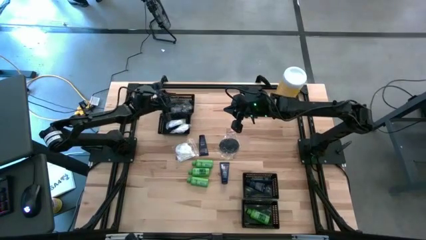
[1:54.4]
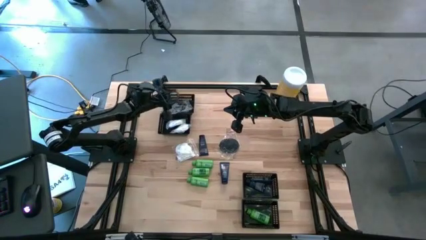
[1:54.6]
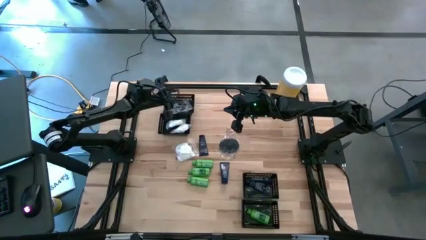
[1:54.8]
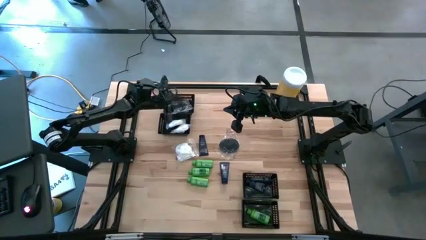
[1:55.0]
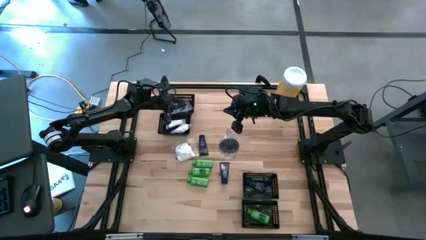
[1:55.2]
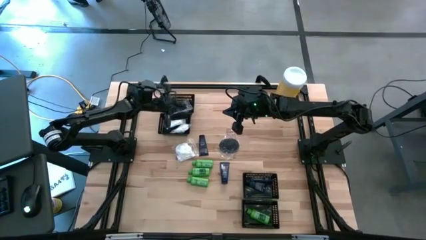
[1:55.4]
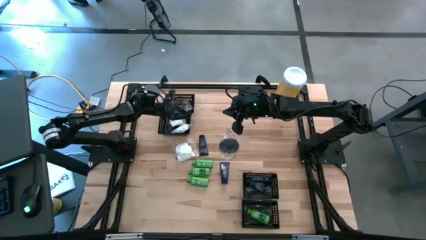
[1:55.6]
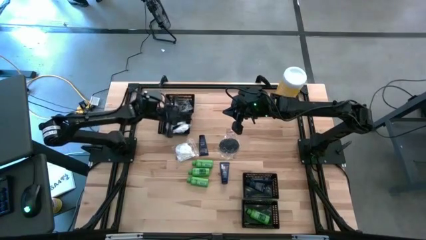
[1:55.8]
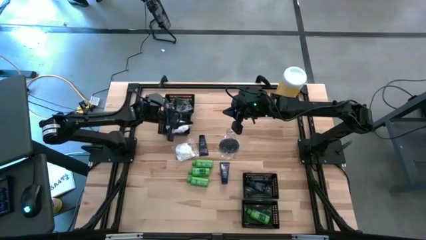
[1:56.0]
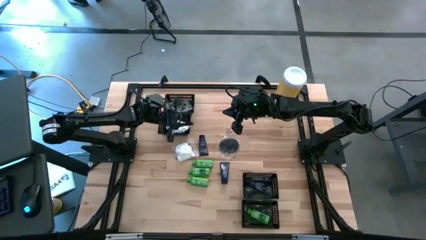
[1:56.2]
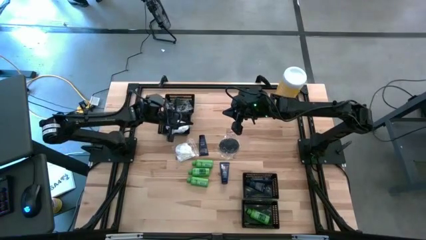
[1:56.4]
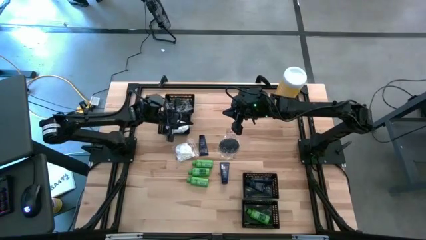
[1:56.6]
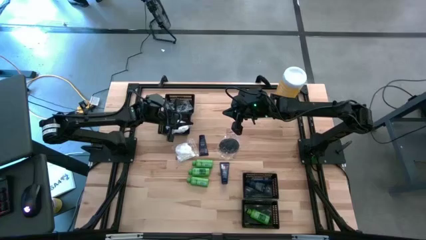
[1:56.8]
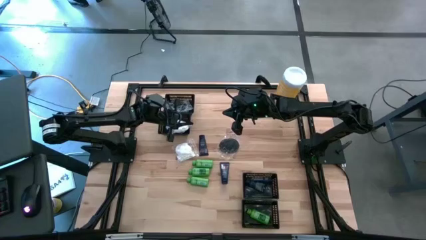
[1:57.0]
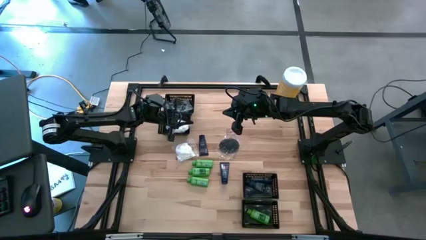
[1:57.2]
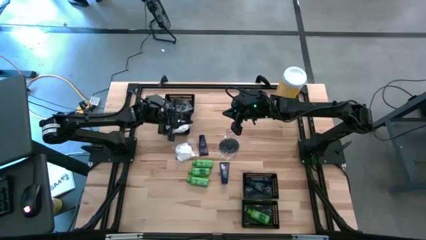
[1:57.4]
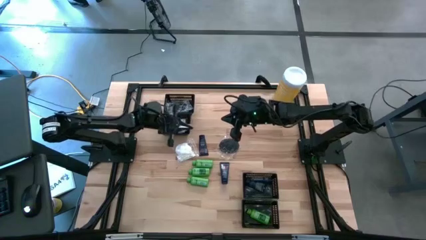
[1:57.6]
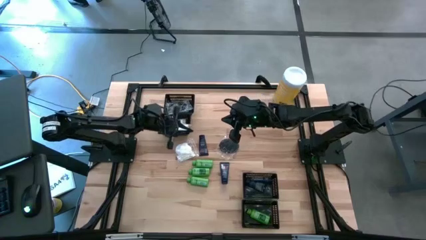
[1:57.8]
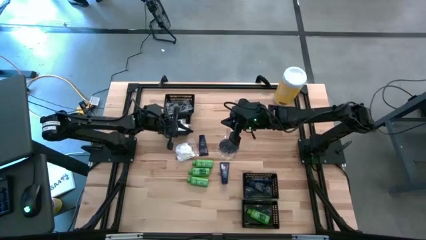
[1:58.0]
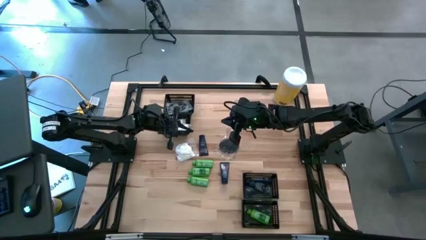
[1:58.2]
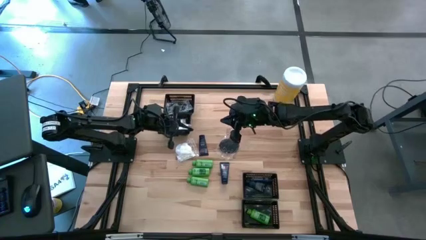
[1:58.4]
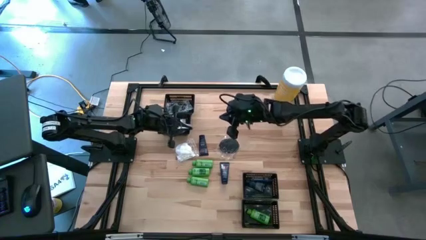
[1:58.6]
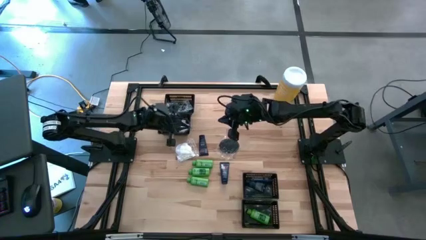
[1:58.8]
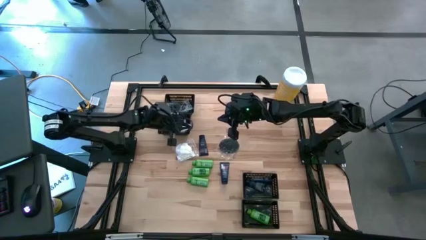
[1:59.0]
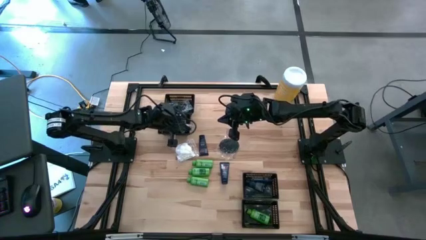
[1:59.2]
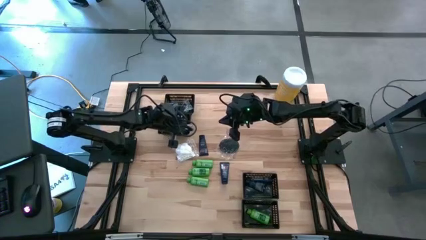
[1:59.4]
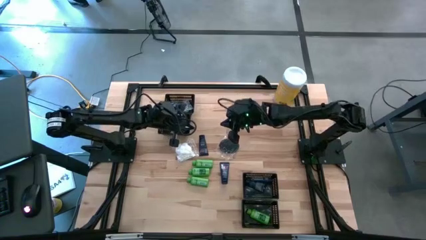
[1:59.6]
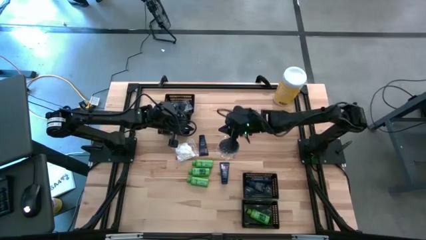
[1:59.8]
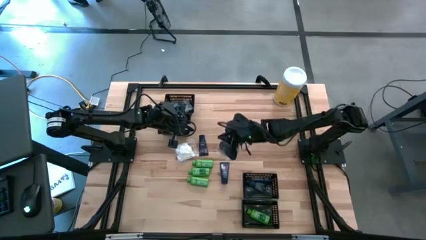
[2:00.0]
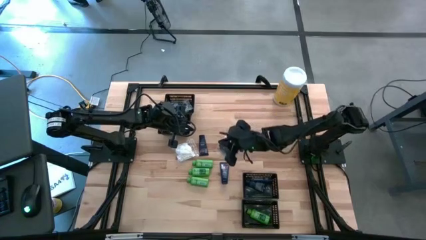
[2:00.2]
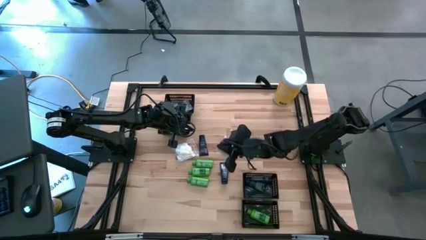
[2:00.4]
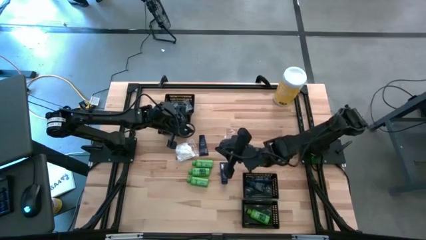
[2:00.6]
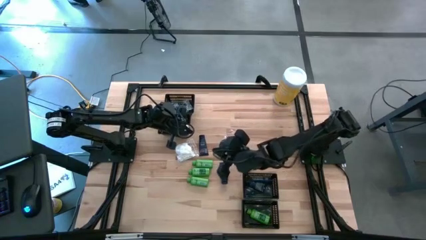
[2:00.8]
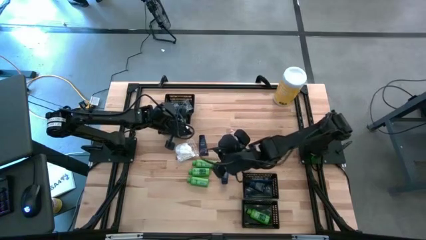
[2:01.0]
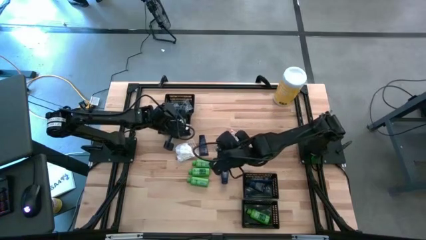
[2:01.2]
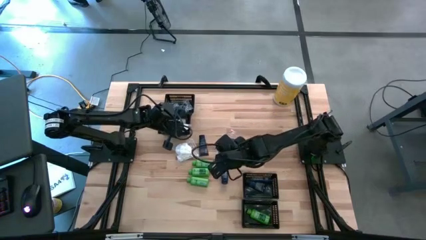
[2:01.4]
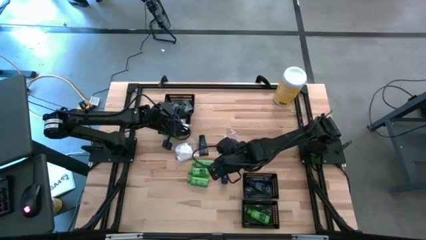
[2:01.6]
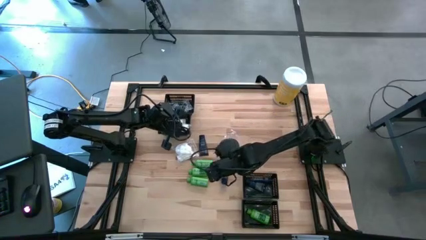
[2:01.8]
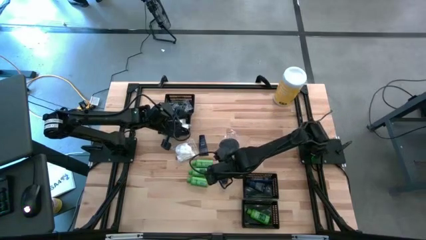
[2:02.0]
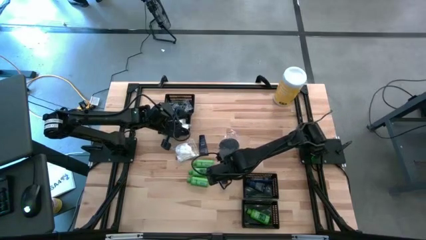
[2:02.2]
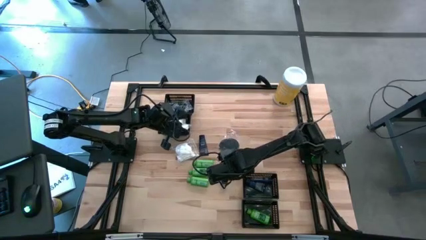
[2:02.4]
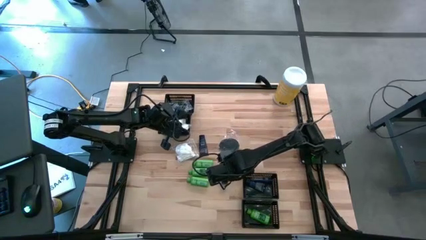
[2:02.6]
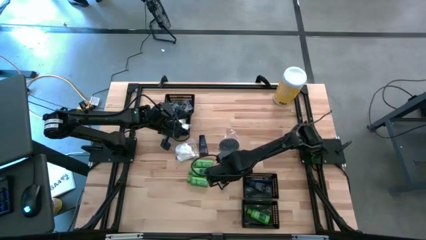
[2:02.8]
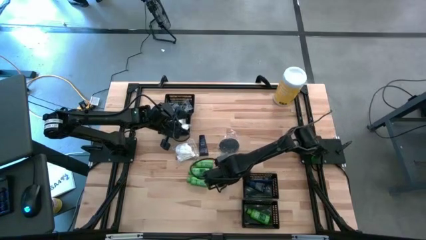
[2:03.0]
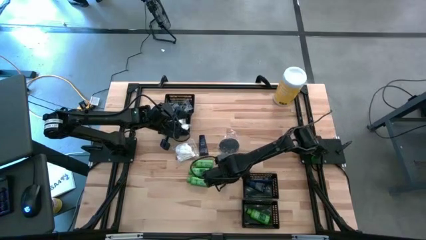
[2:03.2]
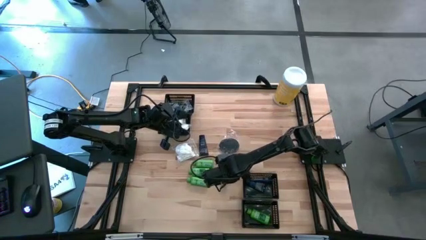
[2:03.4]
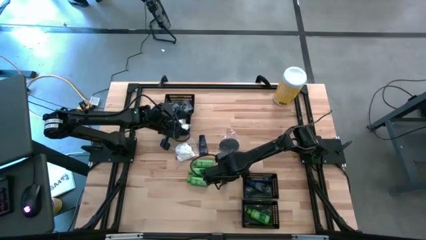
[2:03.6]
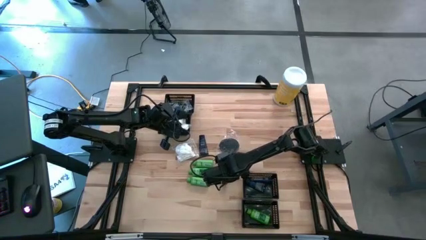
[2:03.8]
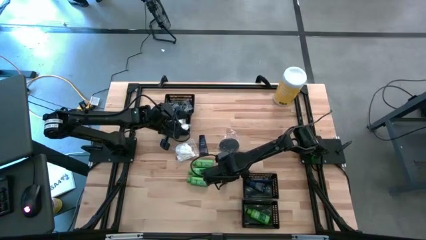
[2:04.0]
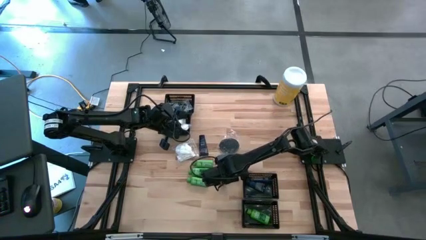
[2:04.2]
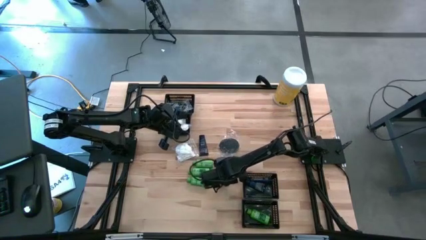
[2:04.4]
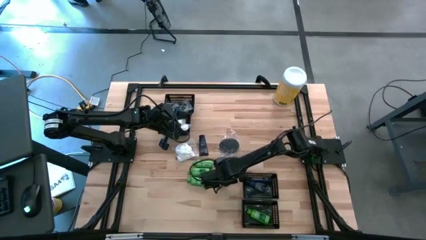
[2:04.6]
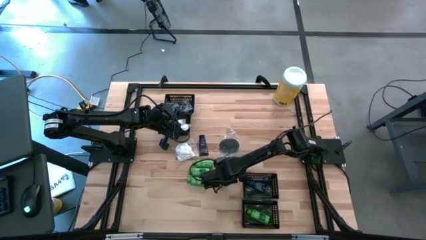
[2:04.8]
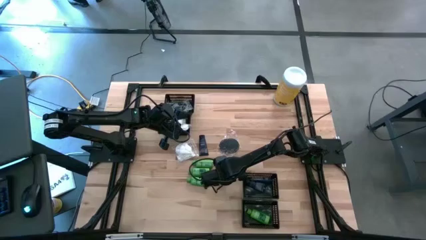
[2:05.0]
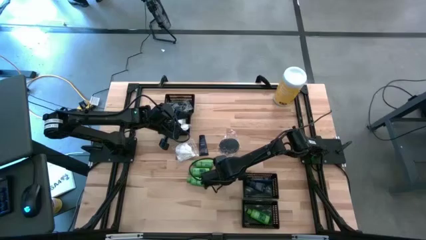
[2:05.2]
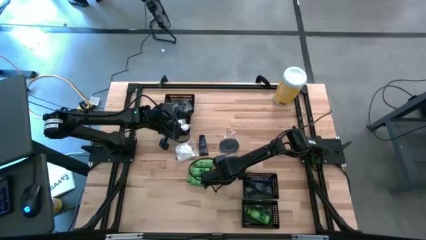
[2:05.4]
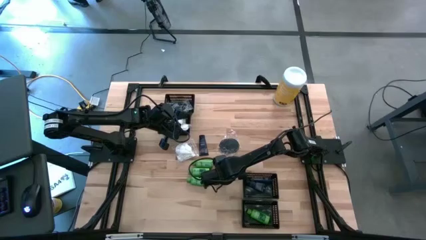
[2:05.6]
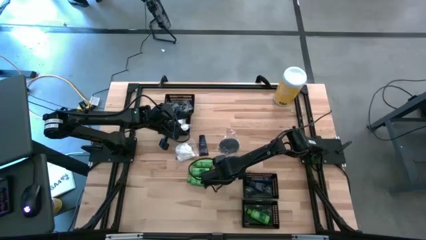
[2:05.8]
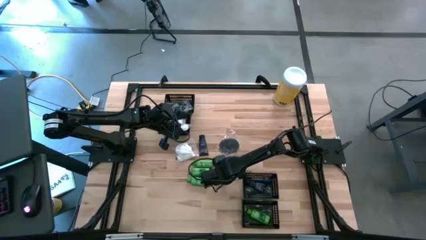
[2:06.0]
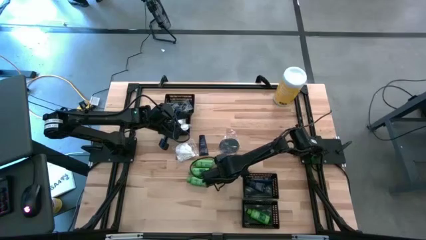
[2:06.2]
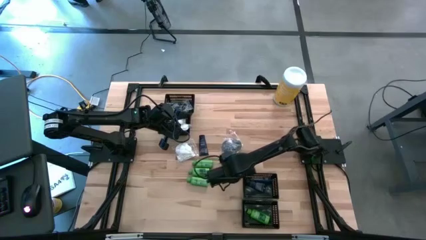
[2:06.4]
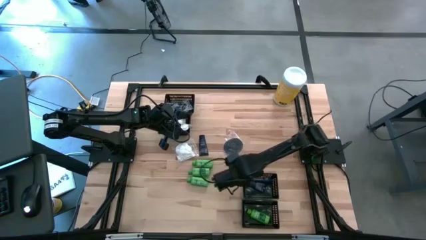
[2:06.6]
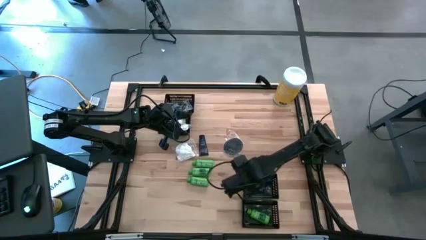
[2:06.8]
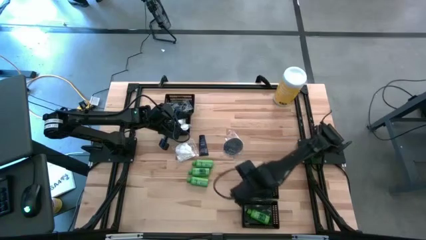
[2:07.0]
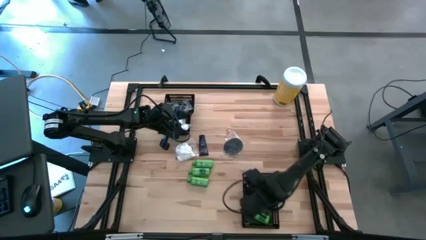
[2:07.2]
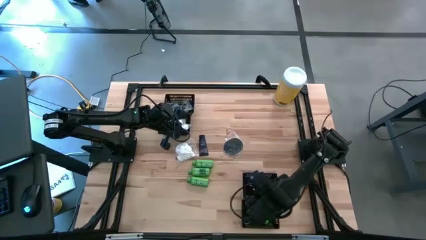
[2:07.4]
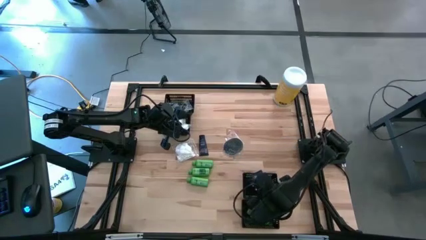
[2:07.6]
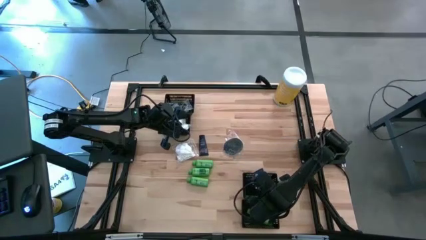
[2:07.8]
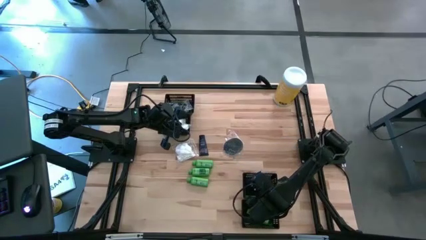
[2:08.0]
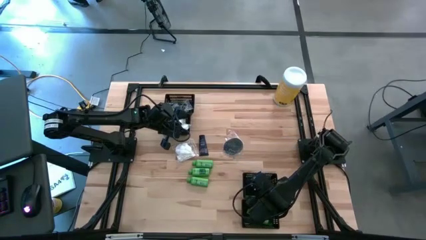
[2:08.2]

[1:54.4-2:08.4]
Task: Pick & Place Travel size toiletries
Put the blue shave cream into the middle bottom black basket
